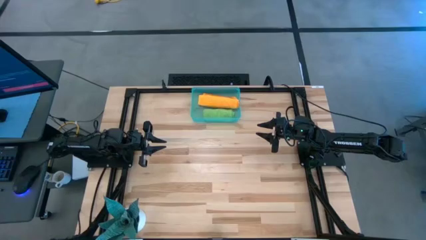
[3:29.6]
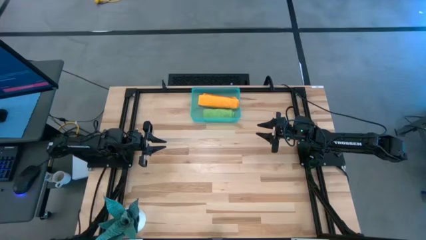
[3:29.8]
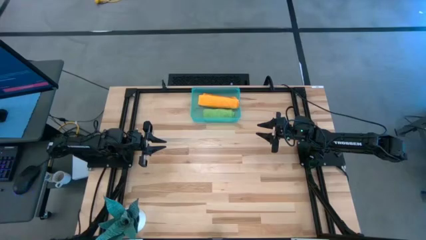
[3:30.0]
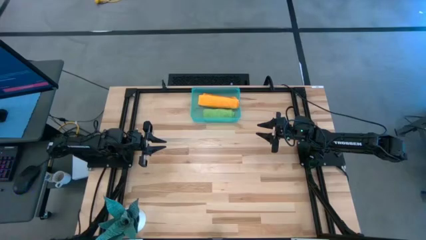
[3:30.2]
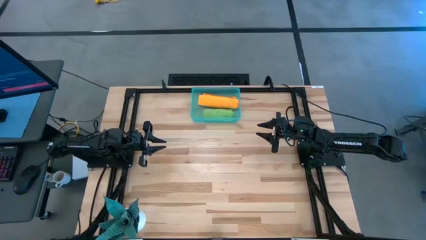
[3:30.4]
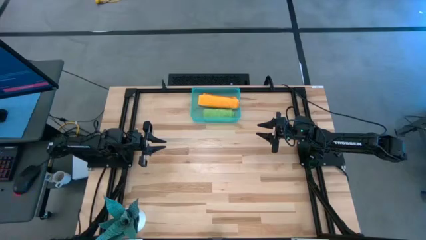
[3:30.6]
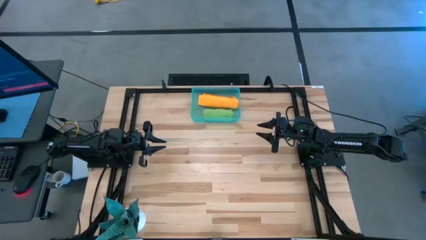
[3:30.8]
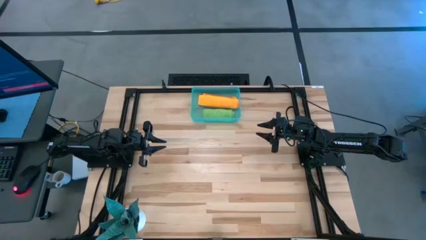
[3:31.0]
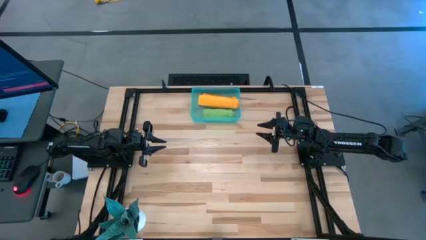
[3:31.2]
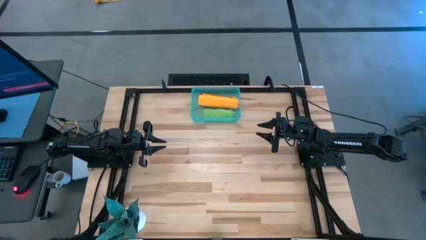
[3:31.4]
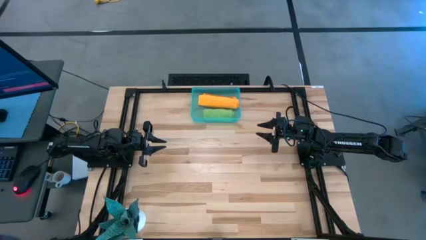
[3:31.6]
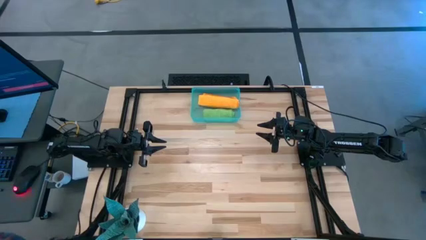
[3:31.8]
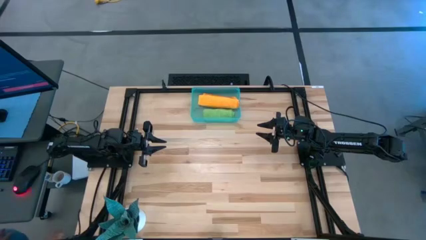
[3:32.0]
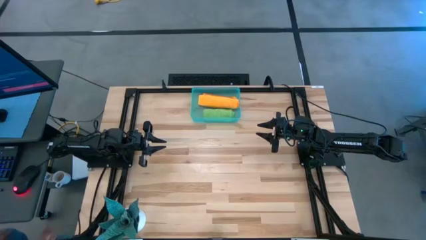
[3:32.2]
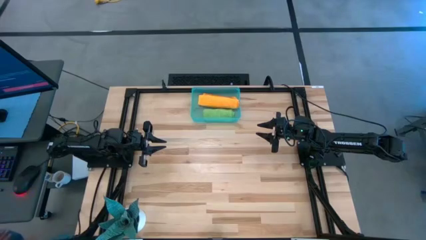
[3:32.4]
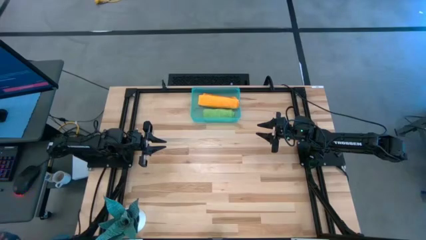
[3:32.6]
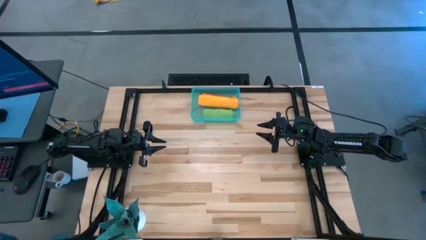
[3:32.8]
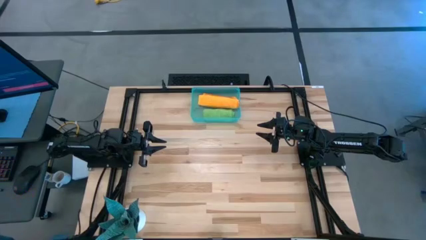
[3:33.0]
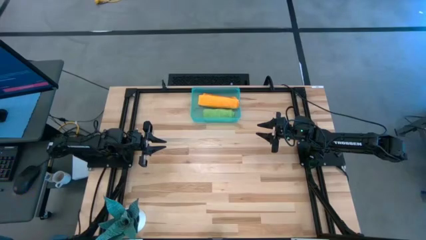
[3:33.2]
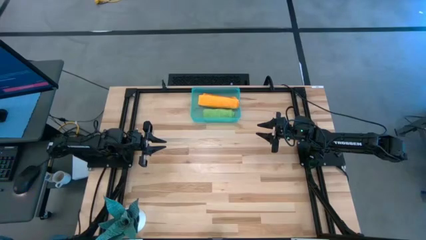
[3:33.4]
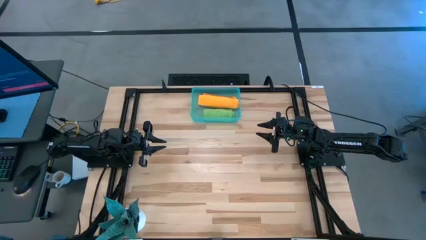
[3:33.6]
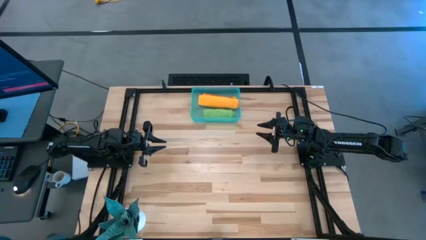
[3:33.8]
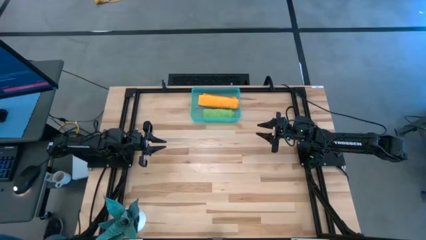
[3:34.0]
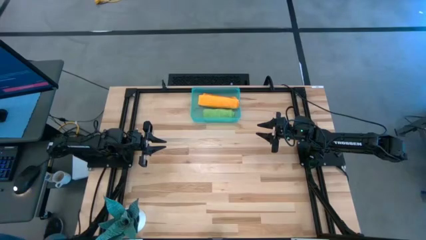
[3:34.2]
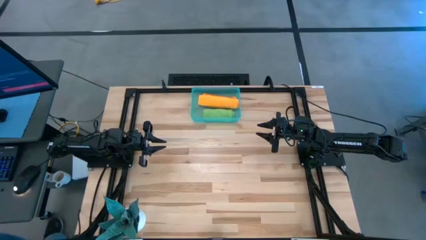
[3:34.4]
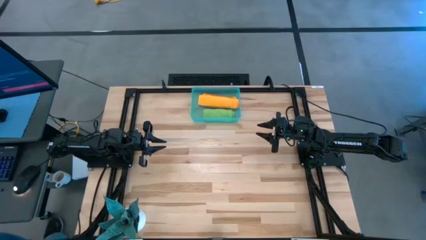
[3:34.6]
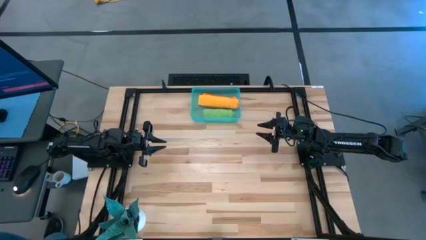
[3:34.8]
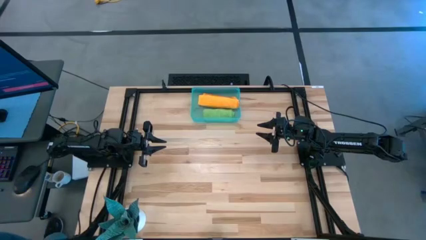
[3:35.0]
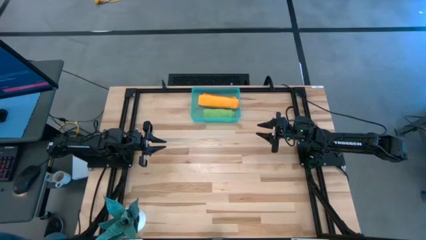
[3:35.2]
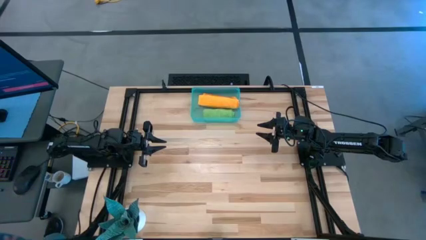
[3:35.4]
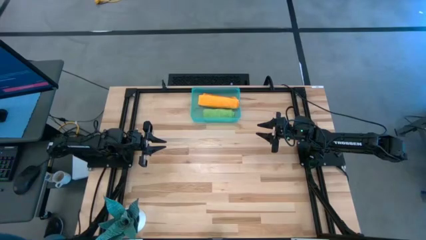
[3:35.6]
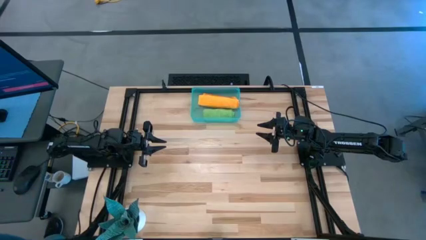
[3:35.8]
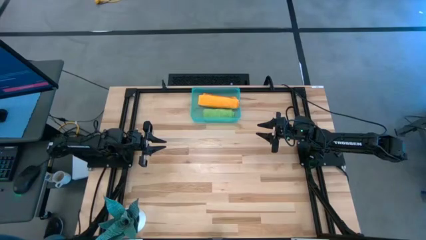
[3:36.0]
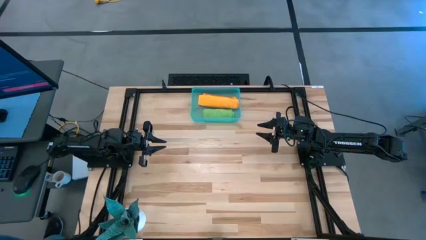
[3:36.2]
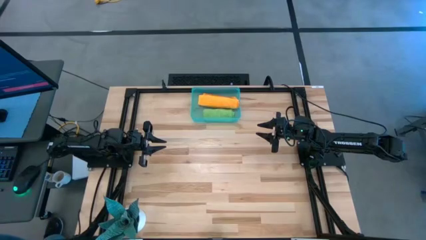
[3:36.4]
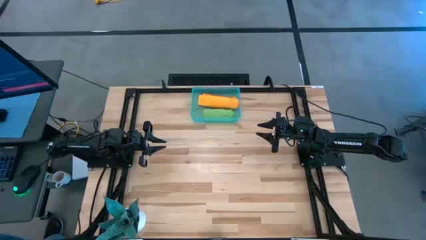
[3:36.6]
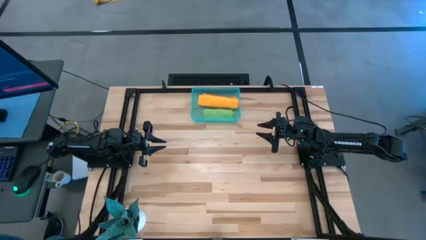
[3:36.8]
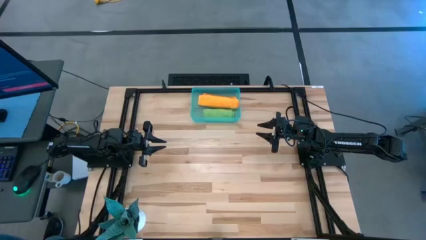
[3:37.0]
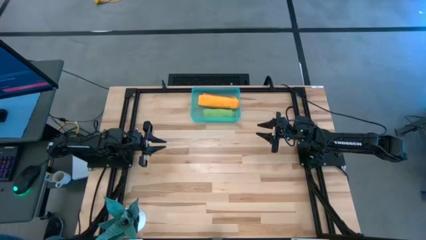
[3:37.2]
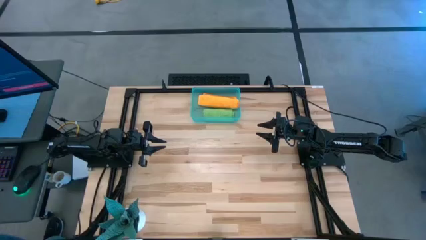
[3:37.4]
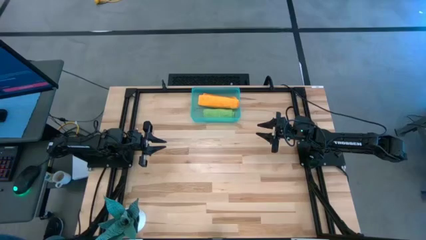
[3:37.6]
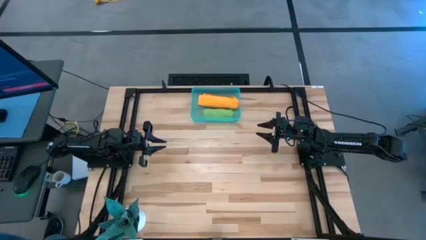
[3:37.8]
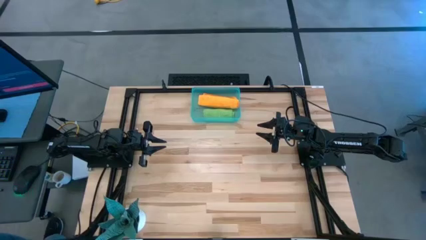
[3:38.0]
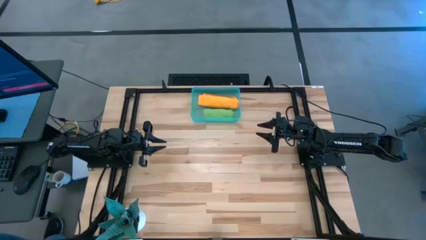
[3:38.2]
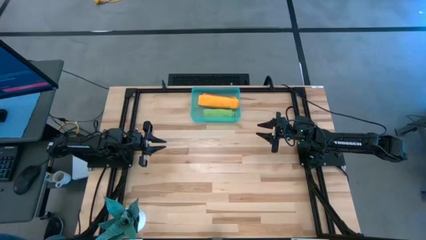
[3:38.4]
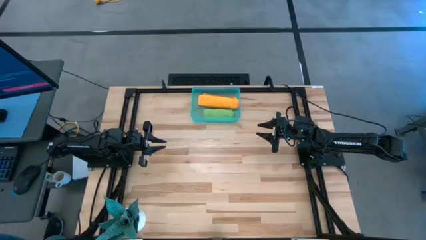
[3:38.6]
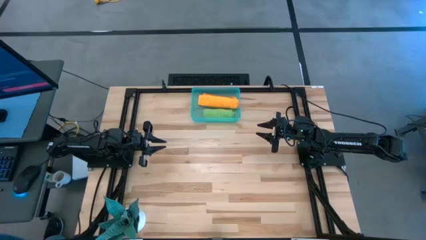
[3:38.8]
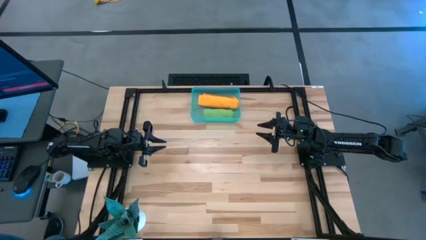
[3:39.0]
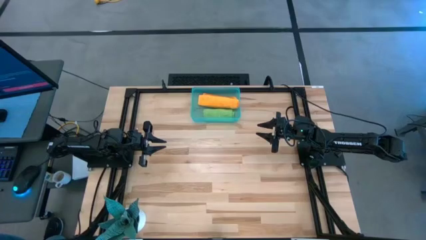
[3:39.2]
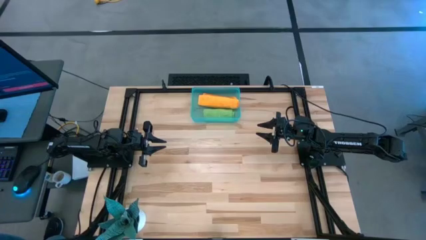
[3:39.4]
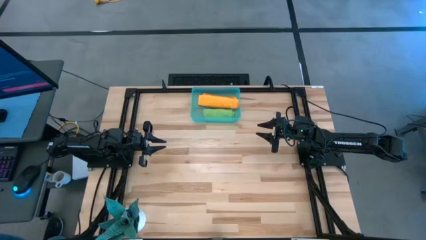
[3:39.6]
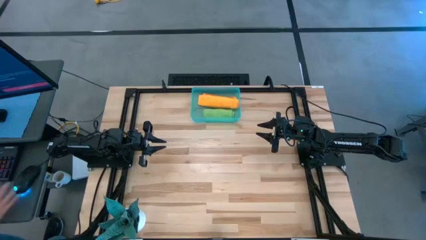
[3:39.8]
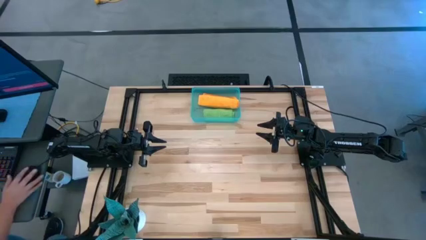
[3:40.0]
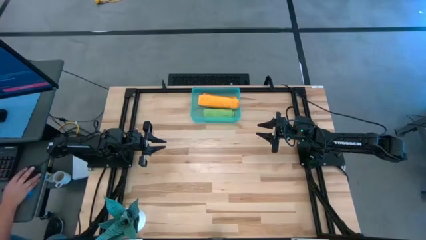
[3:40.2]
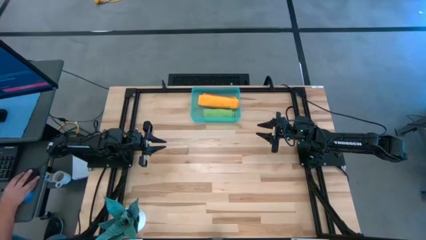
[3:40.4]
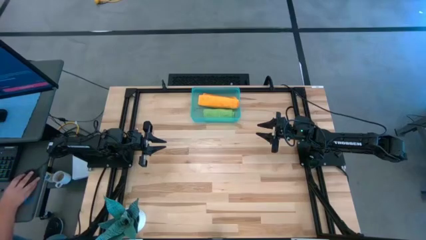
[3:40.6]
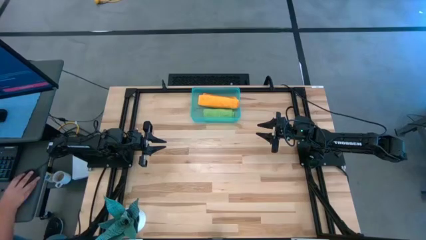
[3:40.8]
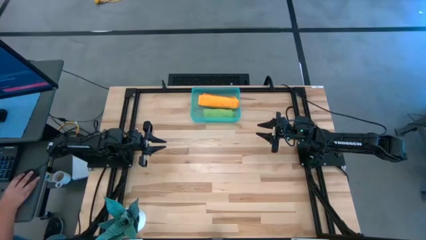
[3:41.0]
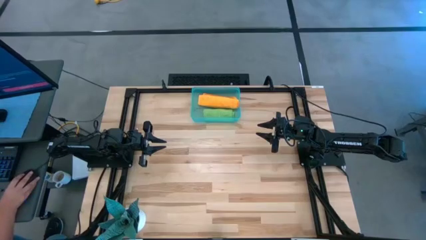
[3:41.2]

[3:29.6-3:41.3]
Task: Roll microfiber towels into tight, uniform cylinder then place into a basket
Return to Home Position
